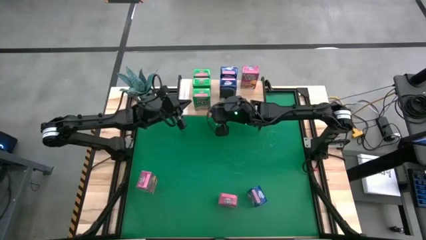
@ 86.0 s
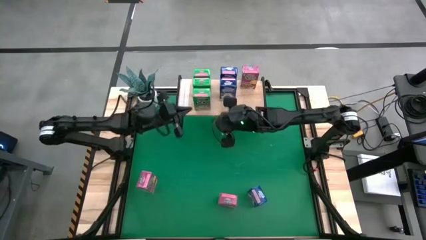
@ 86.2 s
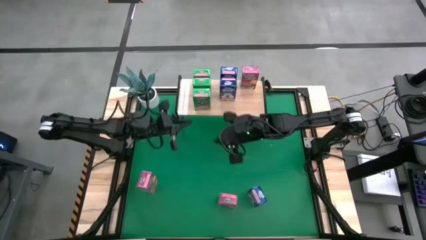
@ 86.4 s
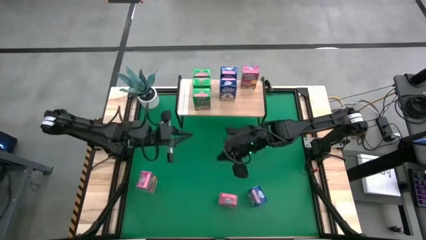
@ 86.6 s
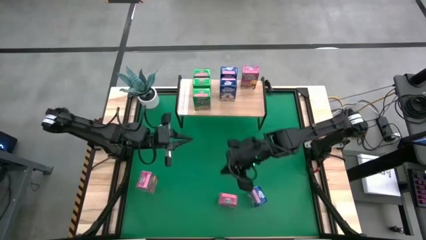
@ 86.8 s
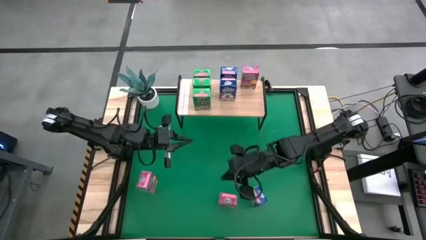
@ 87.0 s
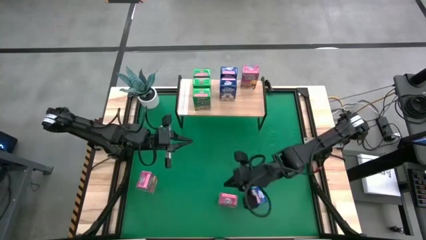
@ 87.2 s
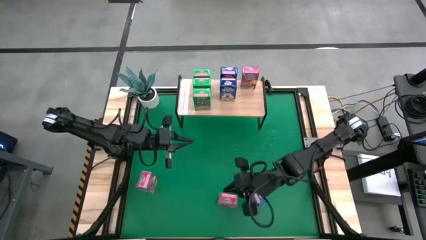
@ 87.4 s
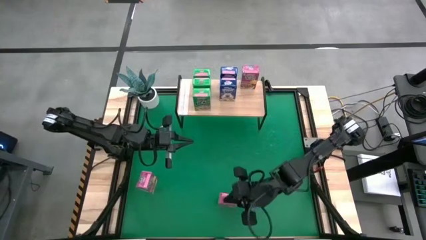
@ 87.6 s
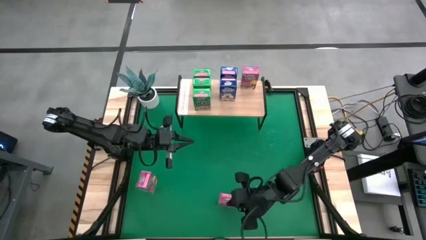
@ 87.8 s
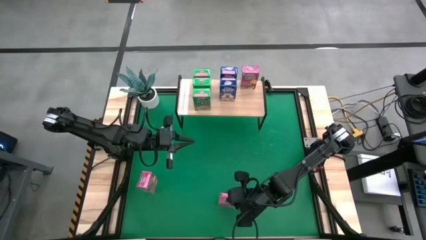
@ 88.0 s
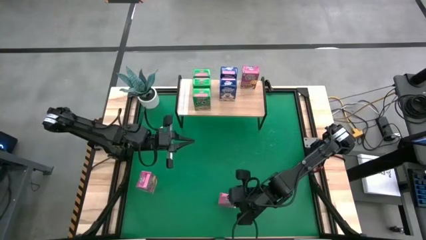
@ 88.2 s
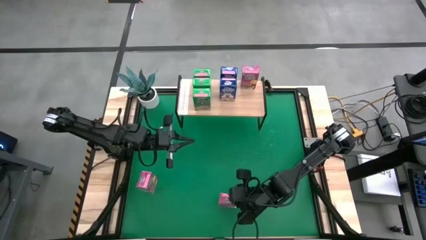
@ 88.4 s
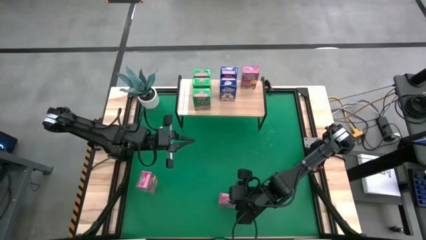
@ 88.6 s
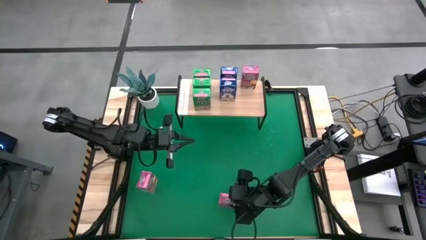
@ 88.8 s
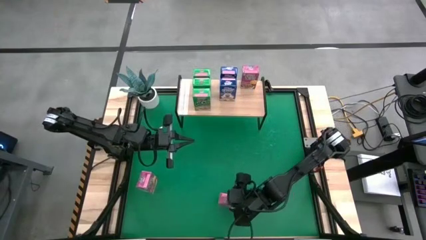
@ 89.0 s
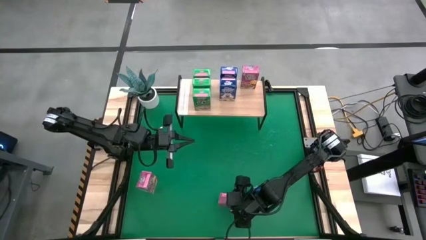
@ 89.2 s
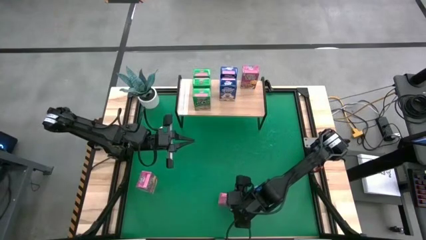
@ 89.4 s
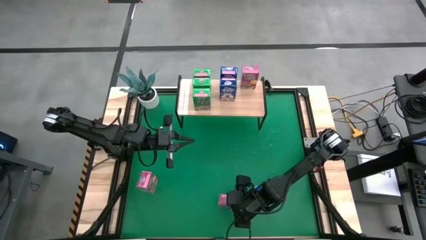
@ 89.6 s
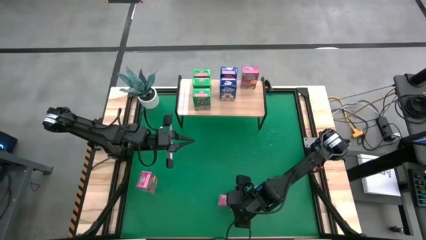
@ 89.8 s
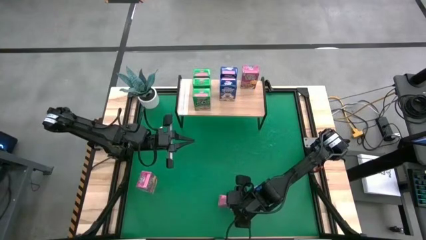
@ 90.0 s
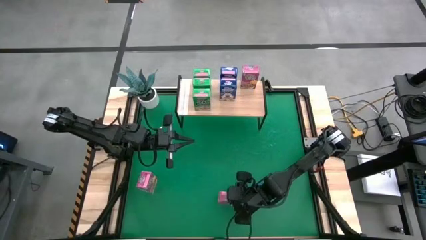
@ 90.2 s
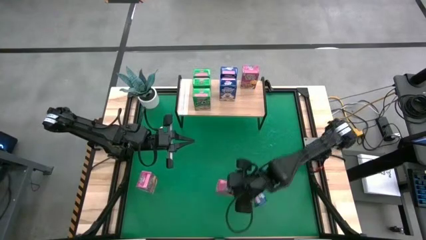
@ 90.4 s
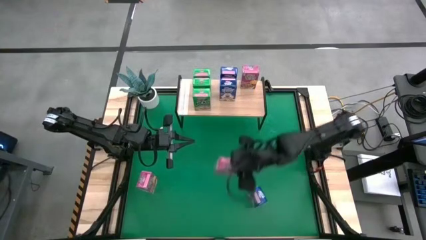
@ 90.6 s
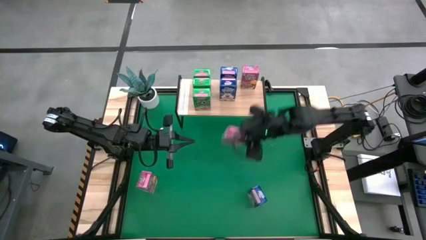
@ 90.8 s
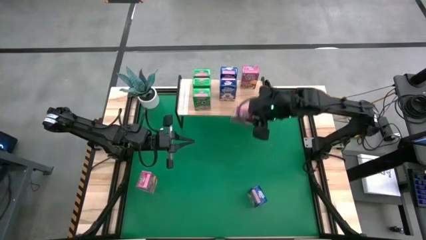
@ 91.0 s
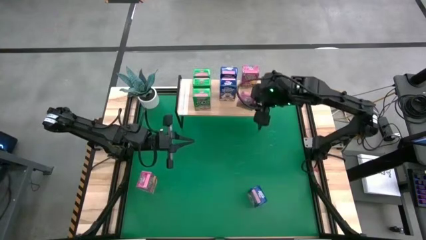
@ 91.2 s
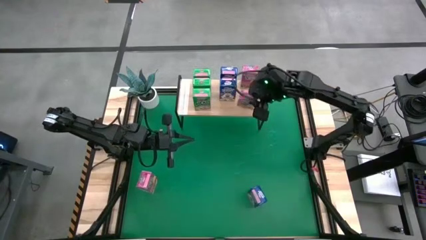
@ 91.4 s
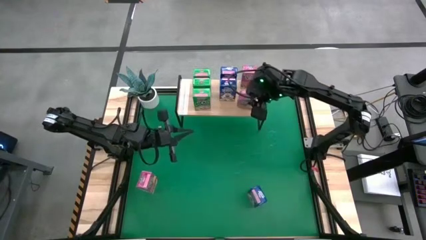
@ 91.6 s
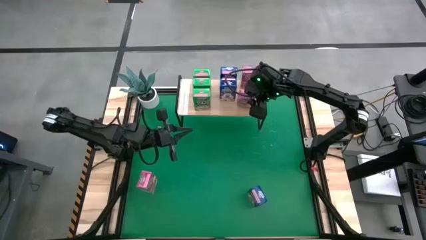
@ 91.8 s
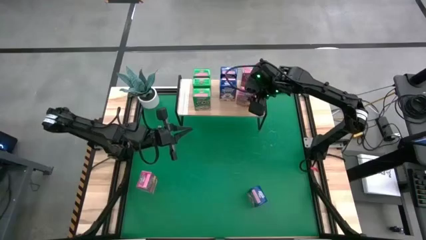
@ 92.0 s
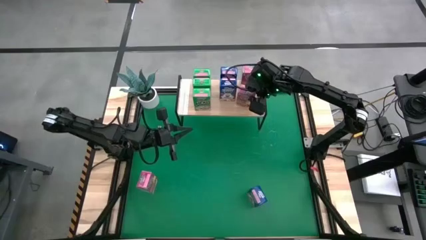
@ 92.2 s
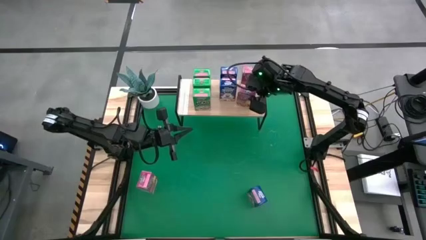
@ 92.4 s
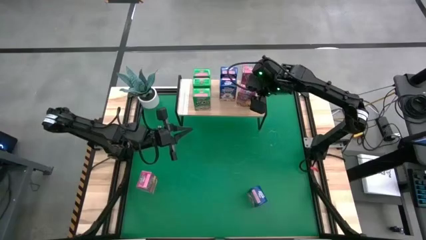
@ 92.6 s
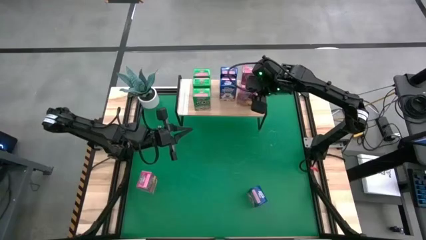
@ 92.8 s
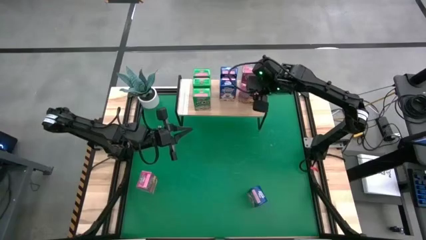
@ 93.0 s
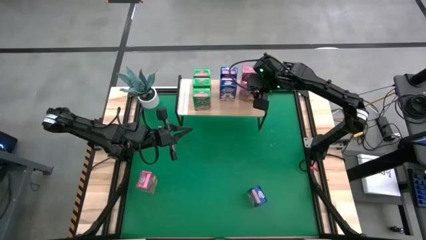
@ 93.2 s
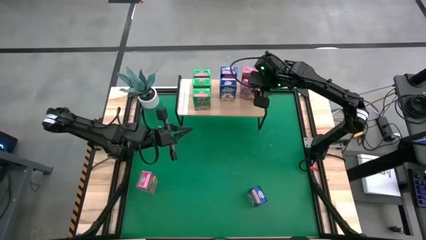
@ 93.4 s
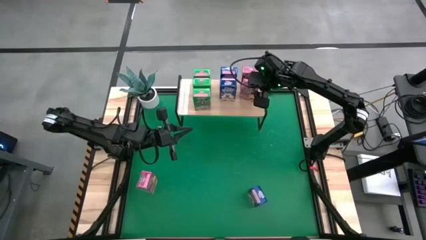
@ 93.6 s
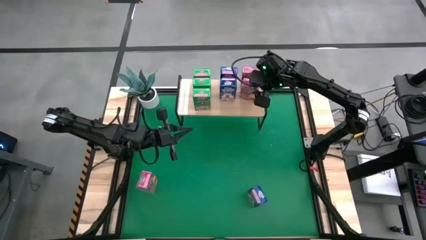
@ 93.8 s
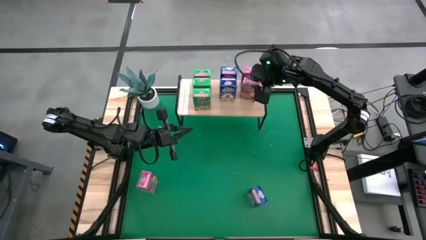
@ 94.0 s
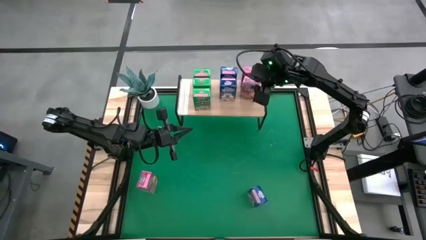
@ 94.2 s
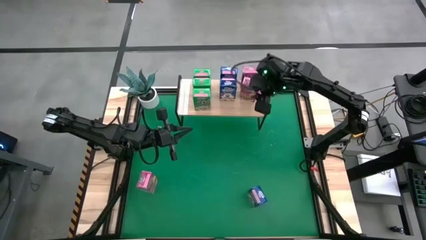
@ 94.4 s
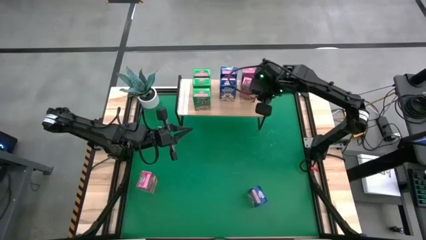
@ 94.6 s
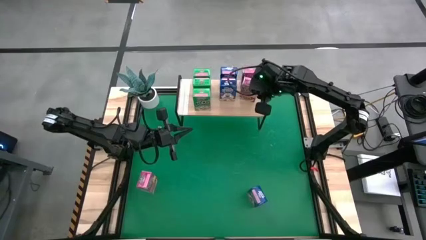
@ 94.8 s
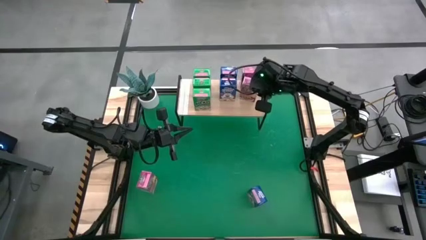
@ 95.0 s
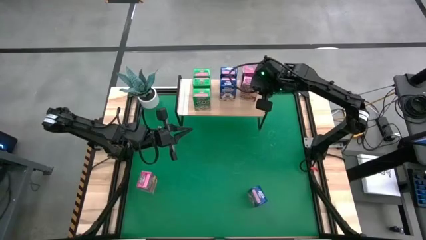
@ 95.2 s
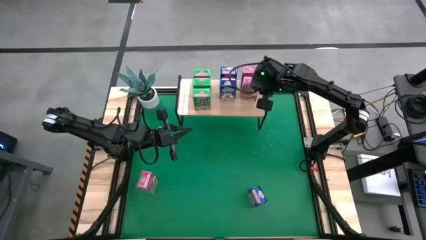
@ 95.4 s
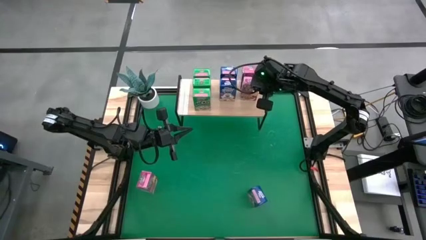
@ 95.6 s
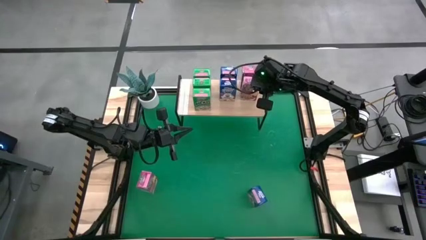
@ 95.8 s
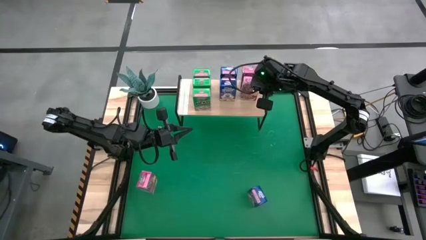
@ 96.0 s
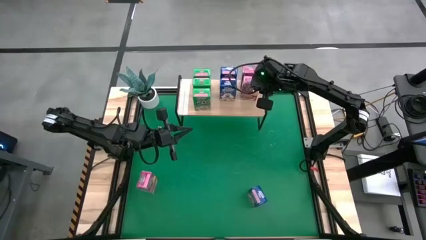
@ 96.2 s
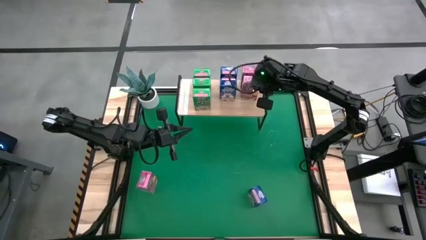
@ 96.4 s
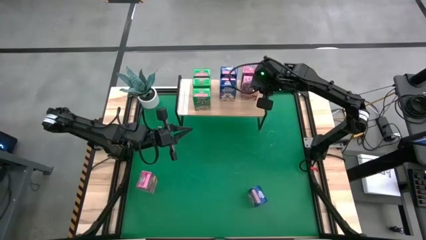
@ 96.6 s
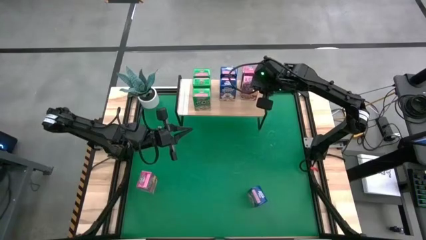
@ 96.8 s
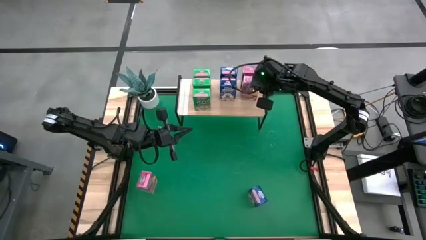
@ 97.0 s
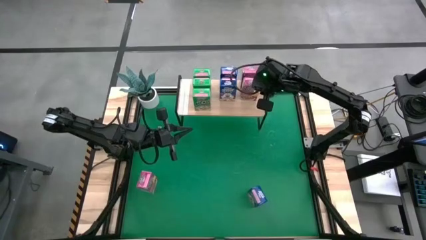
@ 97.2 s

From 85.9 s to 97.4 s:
Task: Stack cereal on shelf
Put the right pink cereal box on the shelf aligned with the other pink cereal box

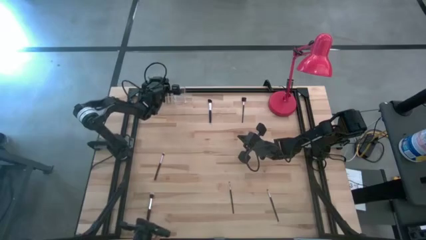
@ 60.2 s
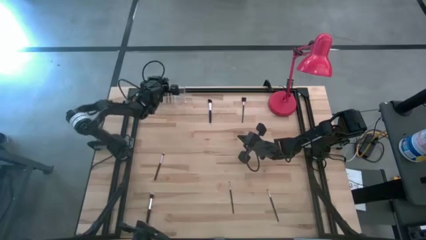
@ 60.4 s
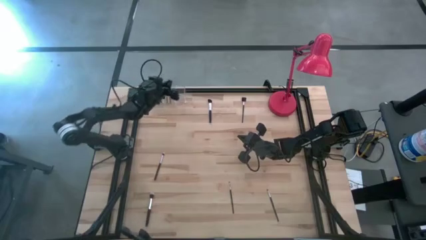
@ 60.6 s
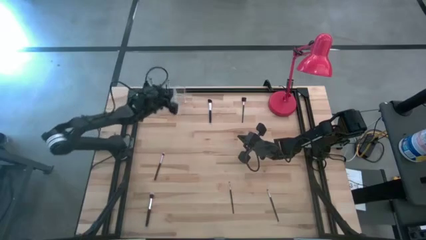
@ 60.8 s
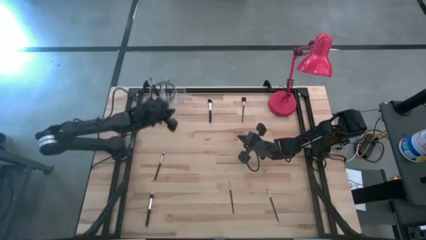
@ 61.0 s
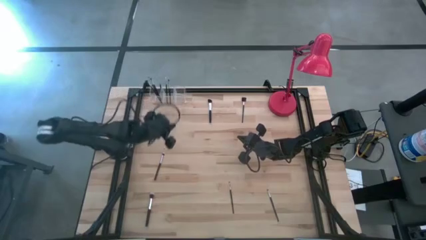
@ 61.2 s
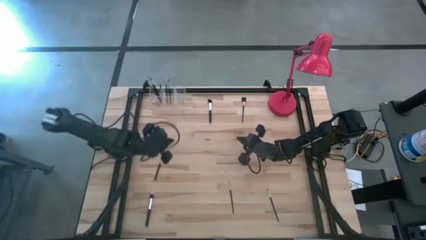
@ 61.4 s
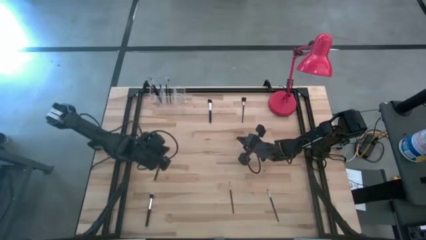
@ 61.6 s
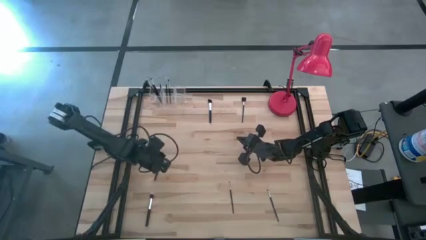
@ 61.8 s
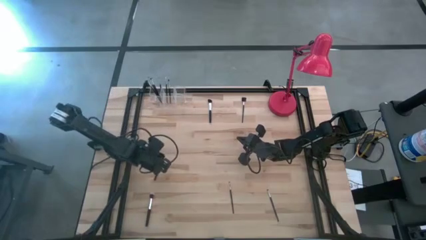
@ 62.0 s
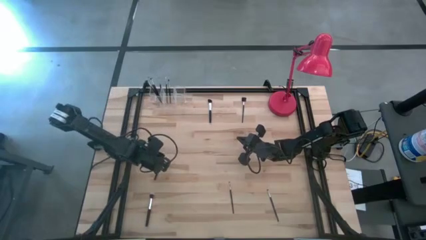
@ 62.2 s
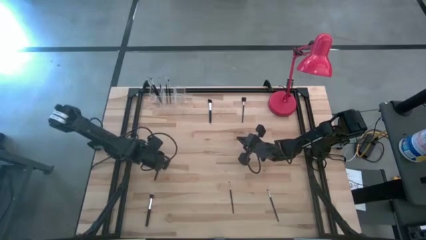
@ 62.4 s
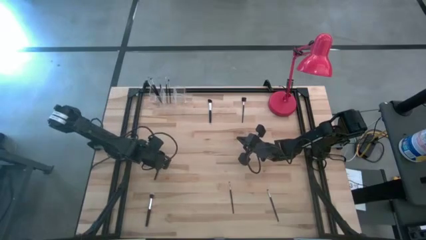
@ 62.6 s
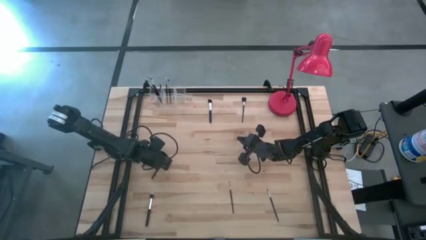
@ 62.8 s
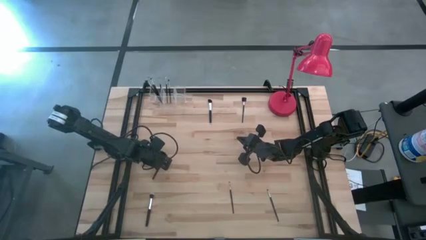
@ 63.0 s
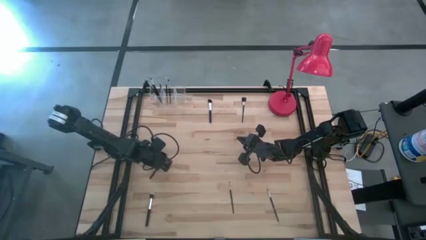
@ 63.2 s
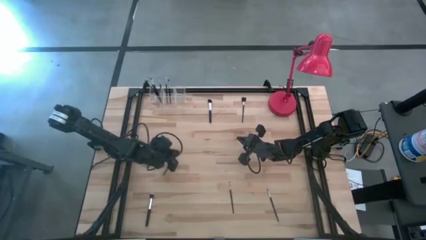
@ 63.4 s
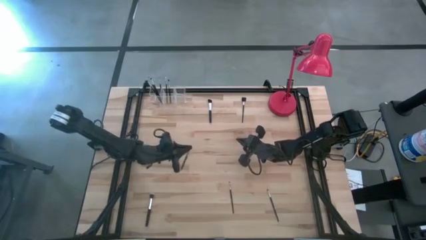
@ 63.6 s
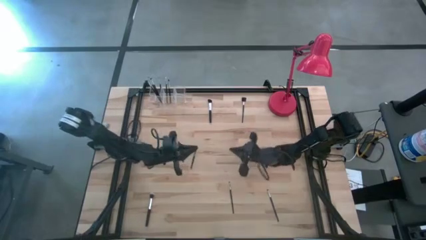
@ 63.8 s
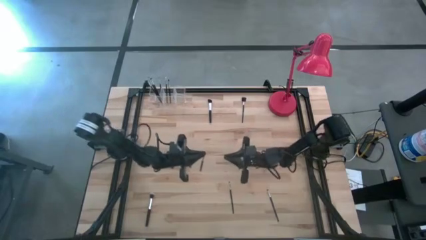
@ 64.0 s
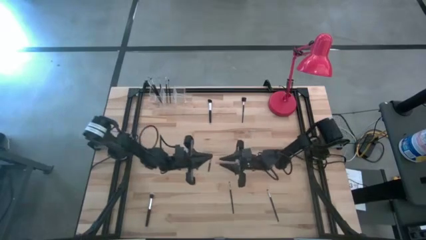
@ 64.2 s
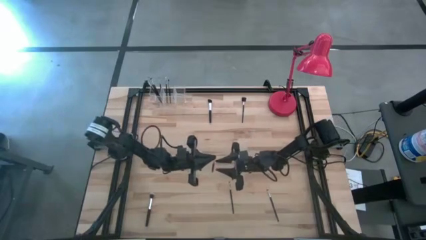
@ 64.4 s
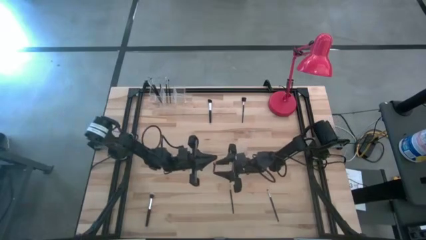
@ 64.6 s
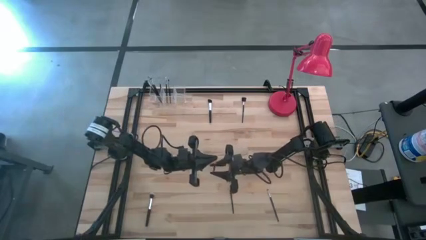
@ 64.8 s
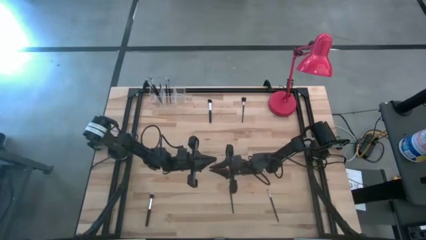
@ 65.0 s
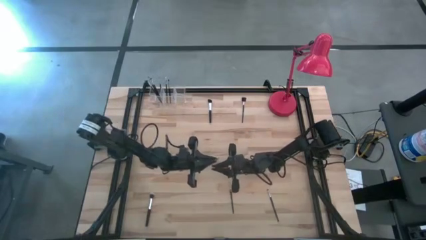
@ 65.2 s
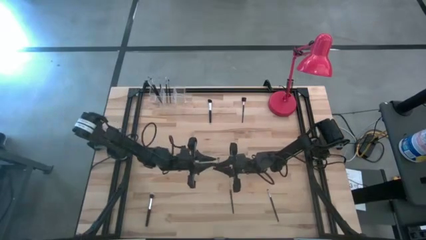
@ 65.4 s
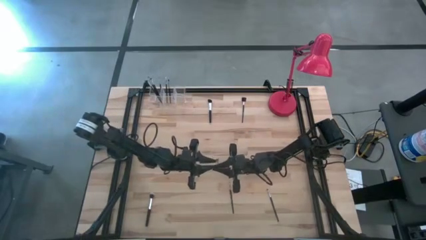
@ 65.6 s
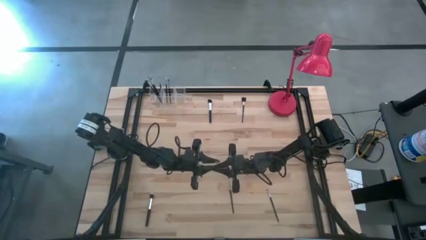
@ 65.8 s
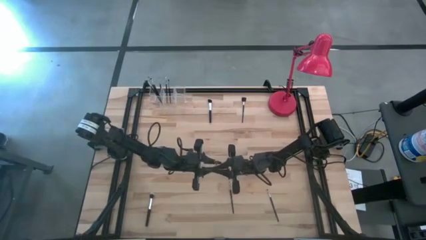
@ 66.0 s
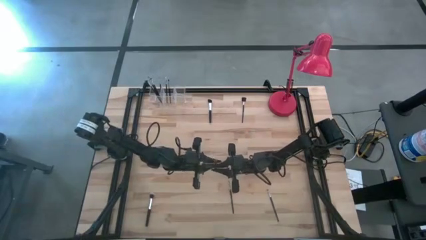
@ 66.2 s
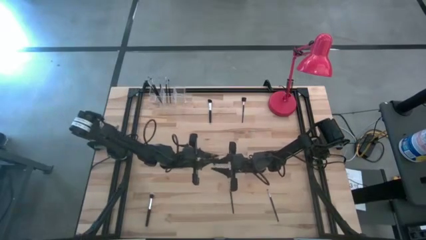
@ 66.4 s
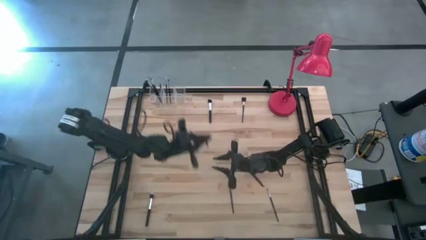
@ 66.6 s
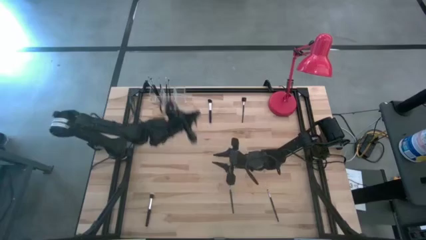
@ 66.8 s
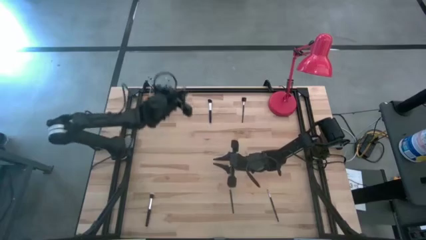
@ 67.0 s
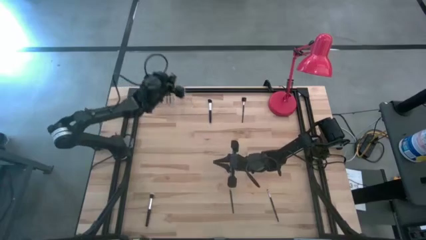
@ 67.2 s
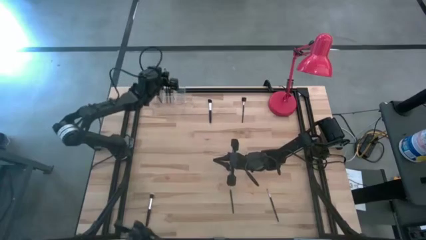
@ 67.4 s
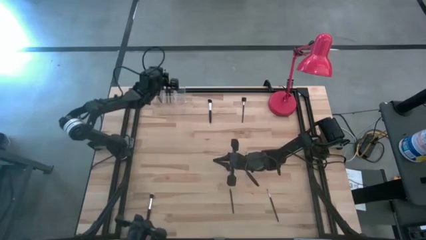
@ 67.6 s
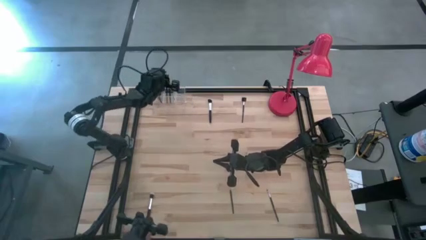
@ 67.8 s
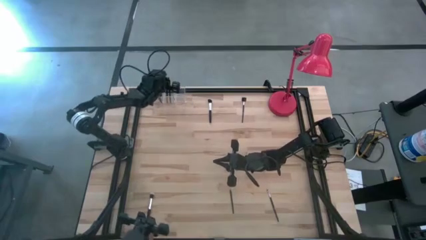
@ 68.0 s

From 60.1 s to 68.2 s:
Task: Pick & Place Makeup Brushes
Put the eyeshadow brush into the transparent organizer
